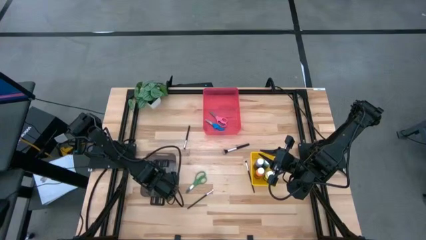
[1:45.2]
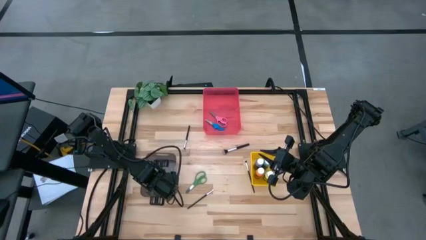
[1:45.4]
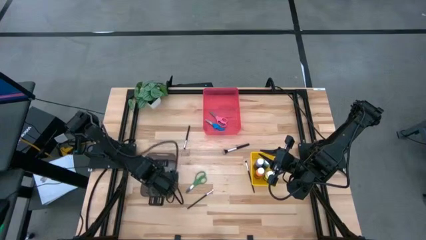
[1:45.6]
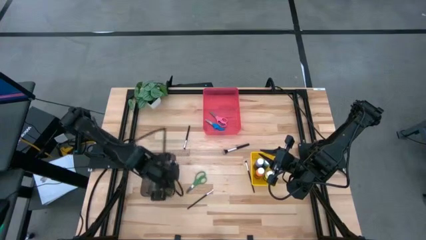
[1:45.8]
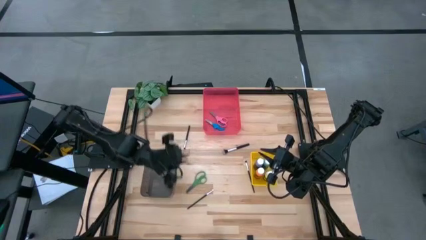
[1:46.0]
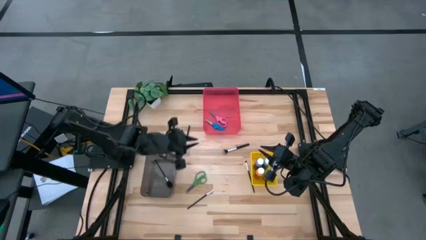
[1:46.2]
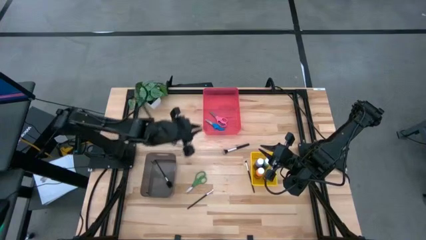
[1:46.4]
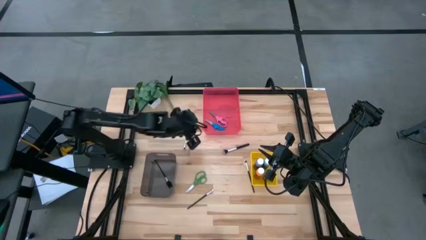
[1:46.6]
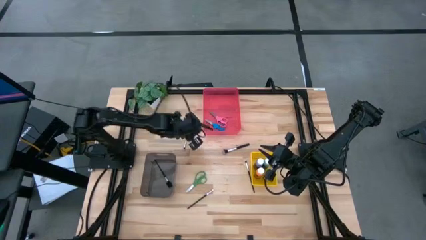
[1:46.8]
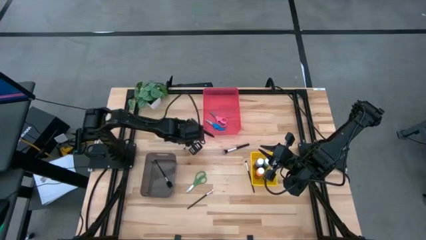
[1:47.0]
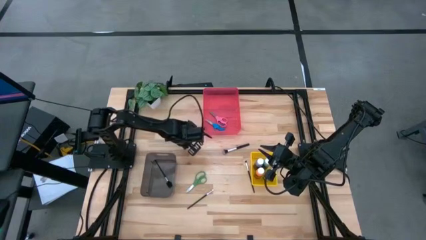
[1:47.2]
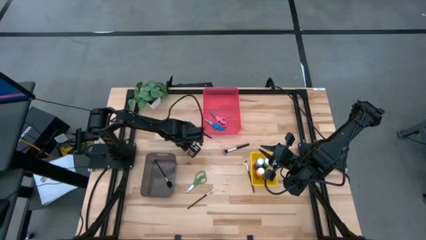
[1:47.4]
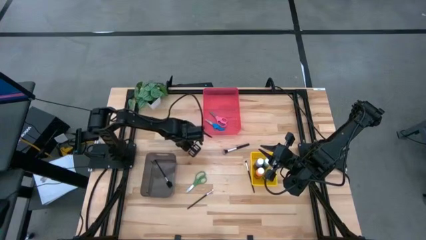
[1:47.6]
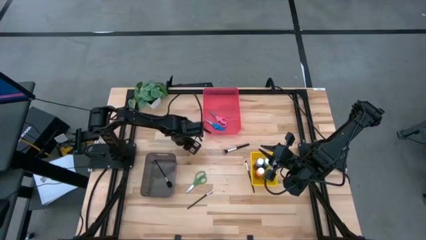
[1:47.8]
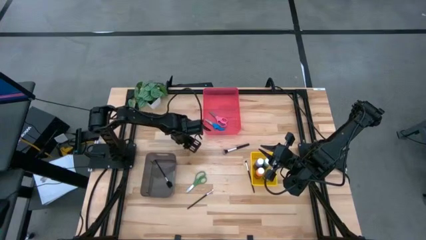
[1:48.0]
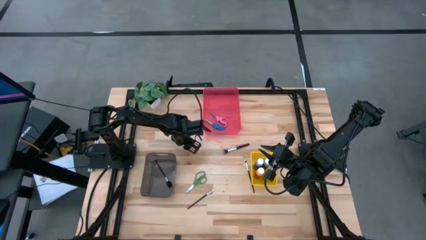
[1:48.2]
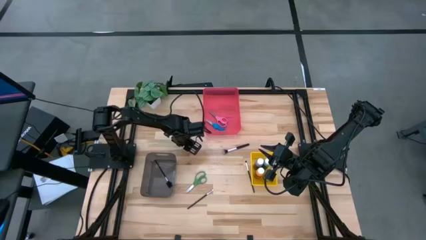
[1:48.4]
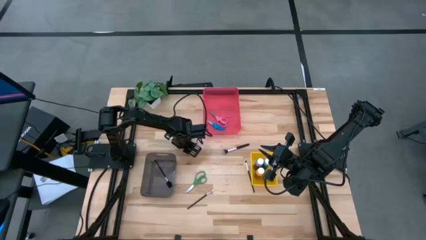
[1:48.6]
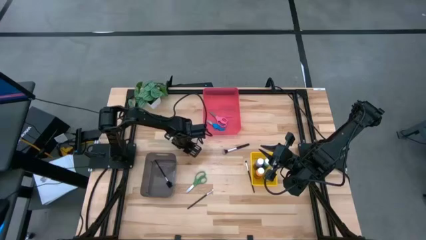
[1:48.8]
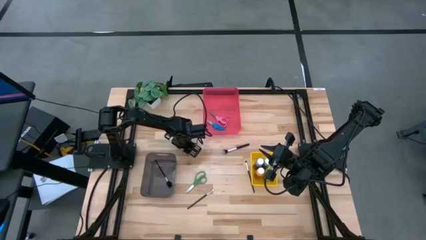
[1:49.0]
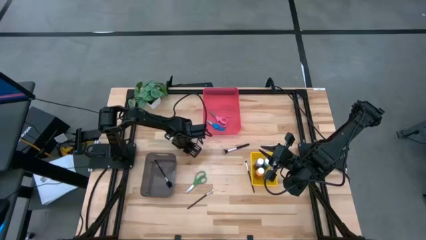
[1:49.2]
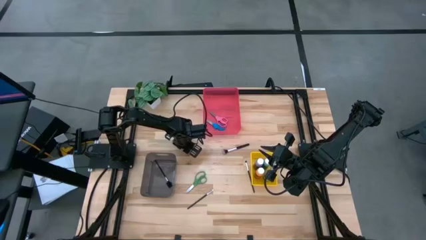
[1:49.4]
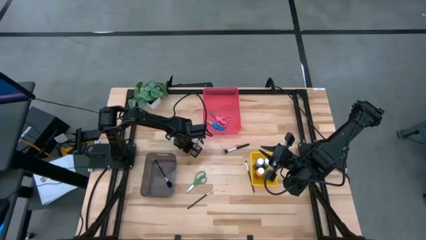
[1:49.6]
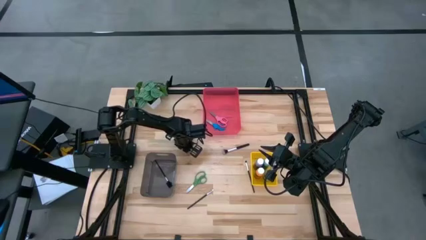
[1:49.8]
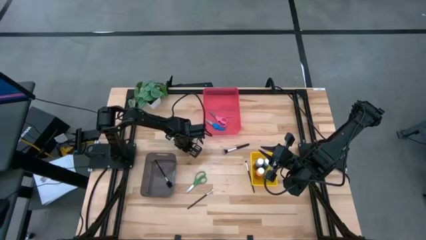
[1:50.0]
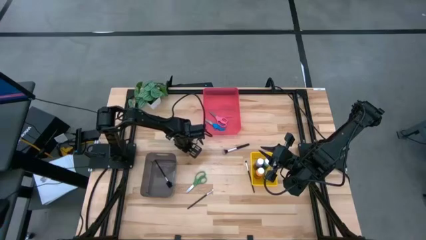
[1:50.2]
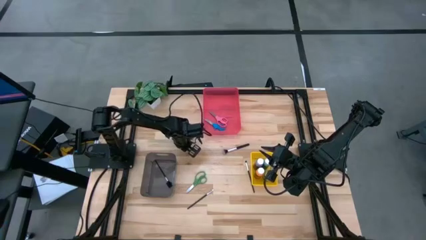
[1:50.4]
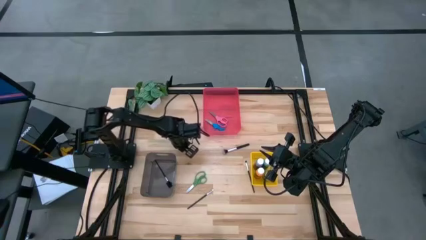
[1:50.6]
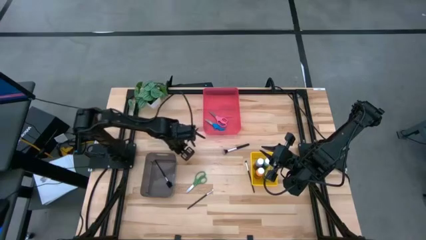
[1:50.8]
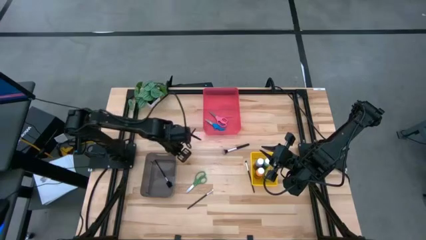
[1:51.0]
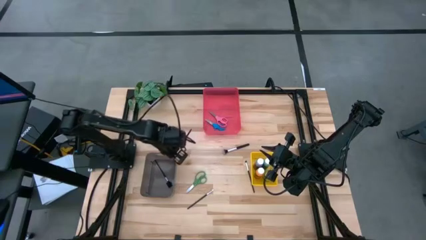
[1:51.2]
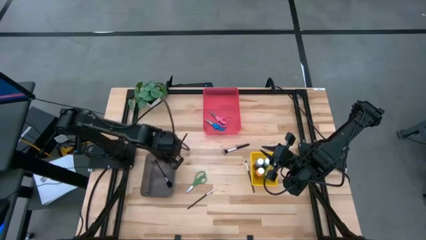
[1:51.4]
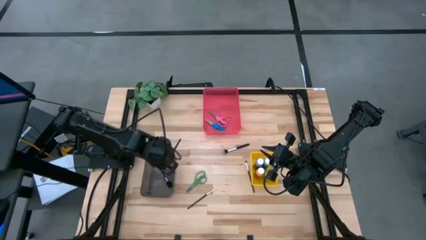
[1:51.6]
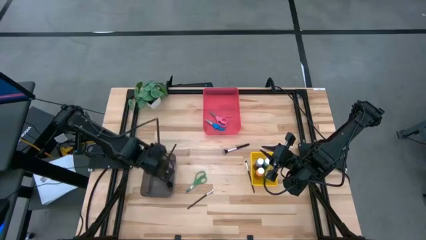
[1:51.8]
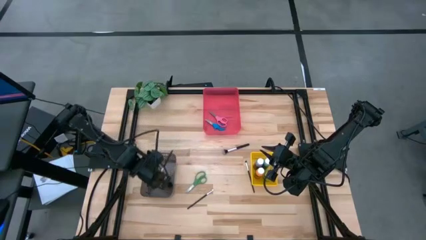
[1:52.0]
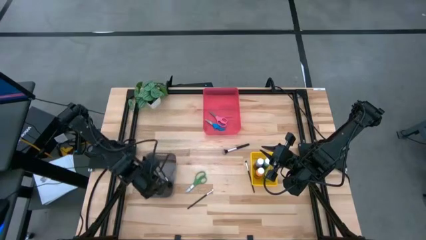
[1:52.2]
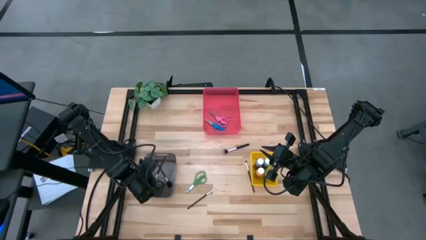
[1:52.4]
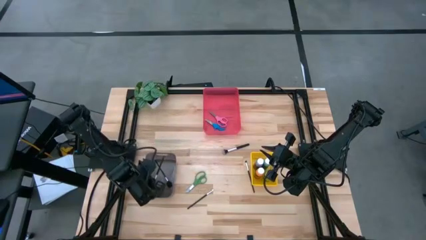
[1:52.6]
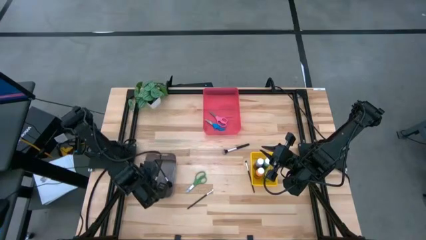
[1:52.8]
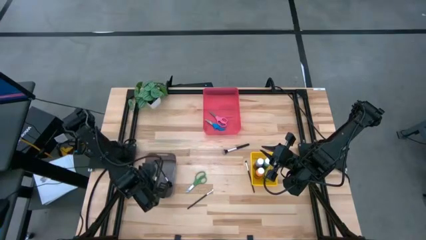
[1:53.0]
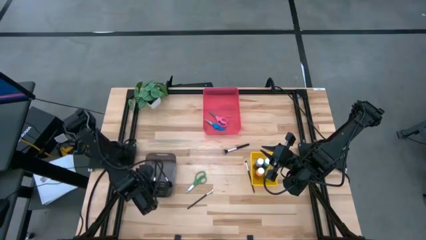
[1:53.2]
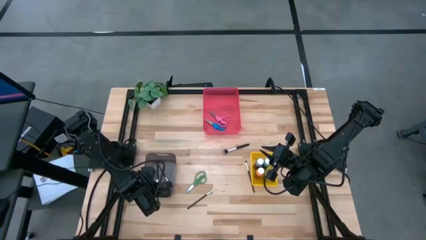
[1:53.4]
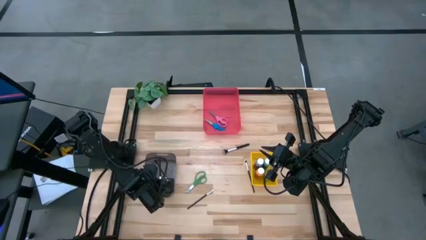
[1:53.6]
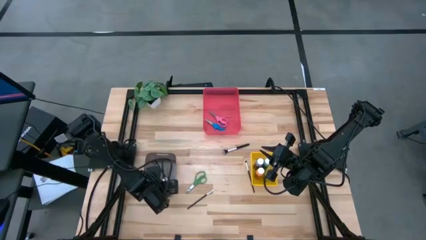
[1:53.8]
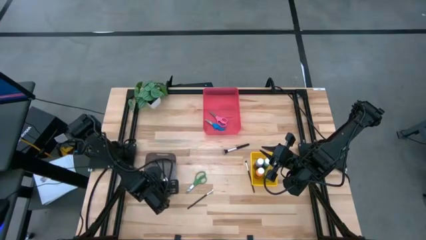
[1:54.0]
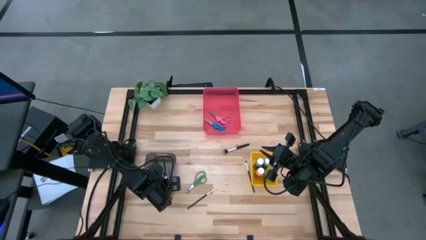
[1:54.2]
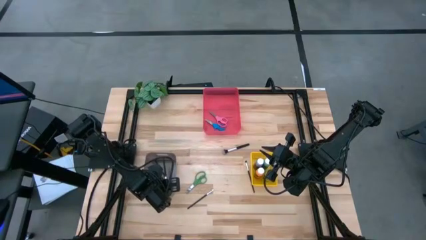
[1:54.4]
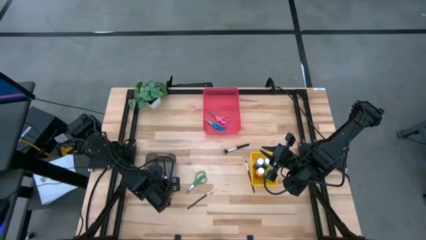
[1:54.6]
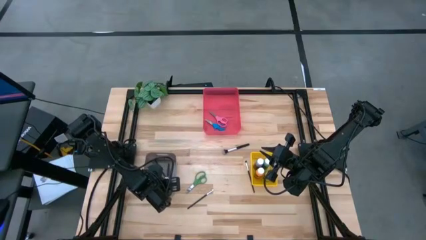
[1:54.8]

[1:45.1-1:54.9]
Task: Pick & Place Paint Supplies
Put the black makeup brush into the black bin

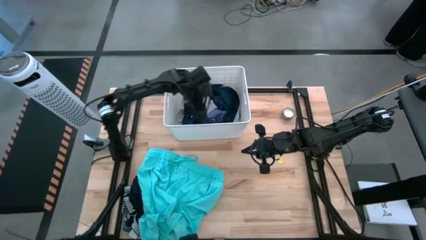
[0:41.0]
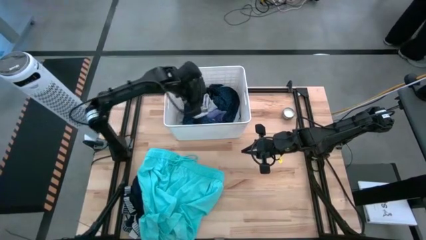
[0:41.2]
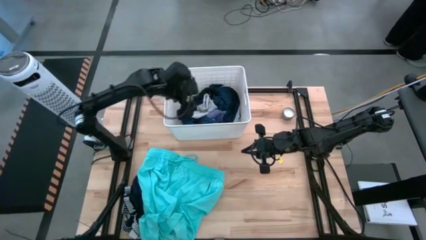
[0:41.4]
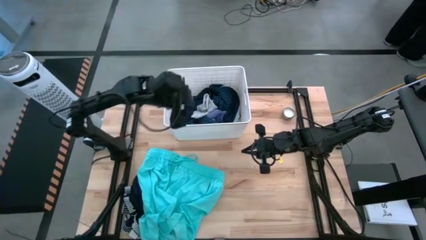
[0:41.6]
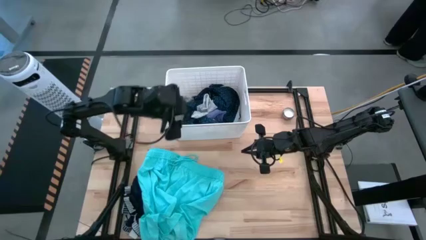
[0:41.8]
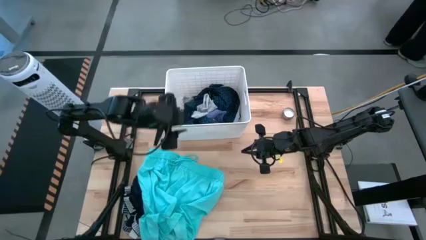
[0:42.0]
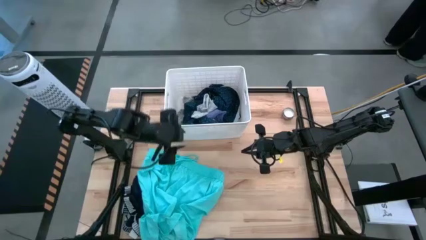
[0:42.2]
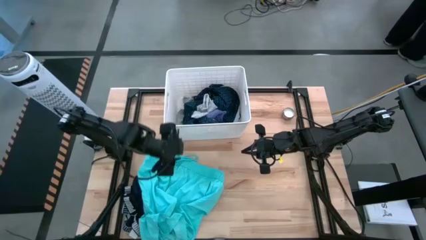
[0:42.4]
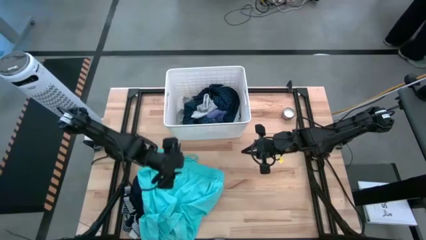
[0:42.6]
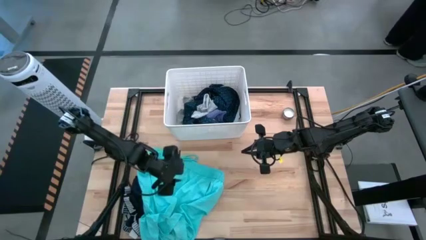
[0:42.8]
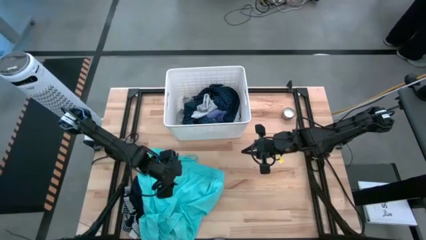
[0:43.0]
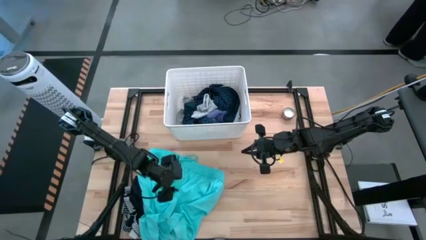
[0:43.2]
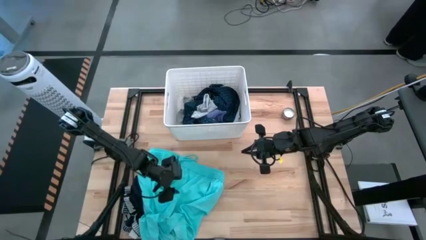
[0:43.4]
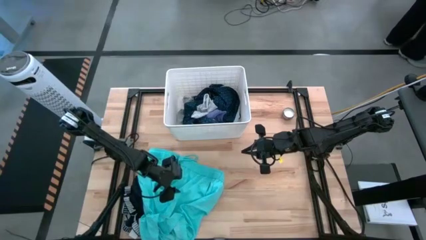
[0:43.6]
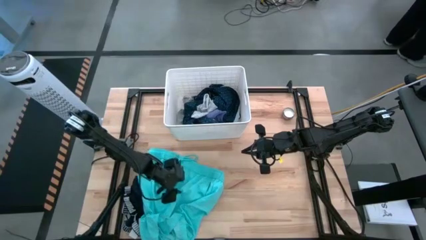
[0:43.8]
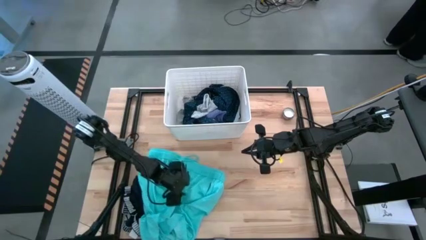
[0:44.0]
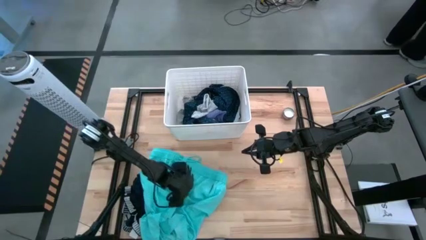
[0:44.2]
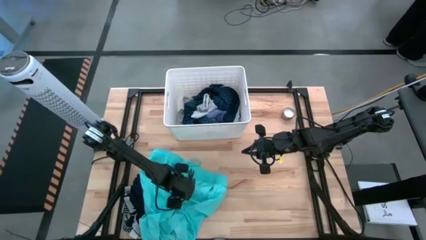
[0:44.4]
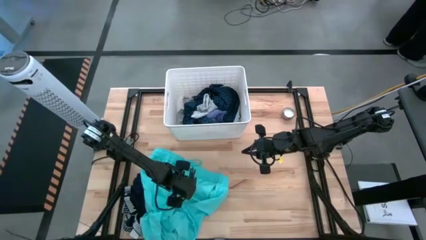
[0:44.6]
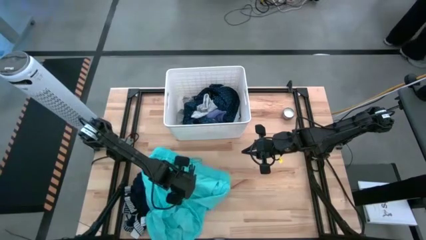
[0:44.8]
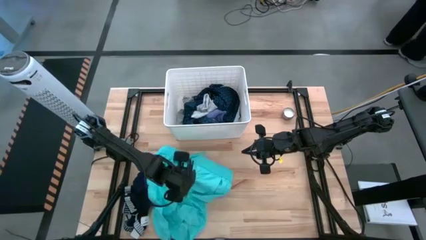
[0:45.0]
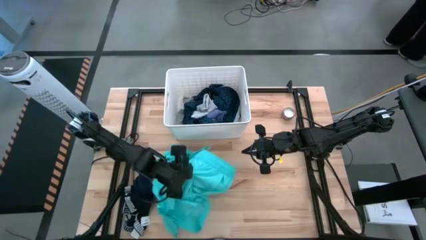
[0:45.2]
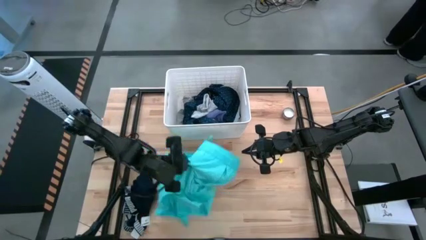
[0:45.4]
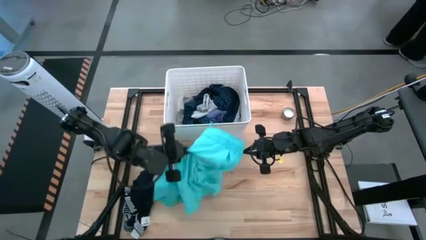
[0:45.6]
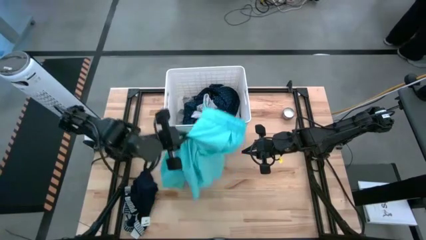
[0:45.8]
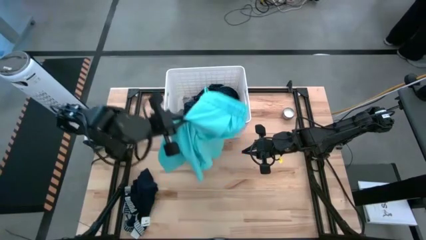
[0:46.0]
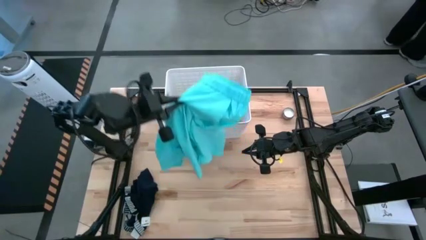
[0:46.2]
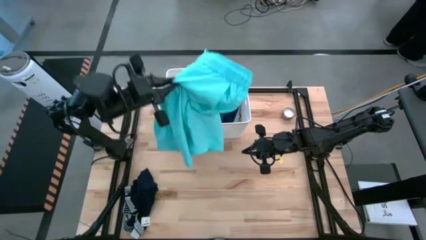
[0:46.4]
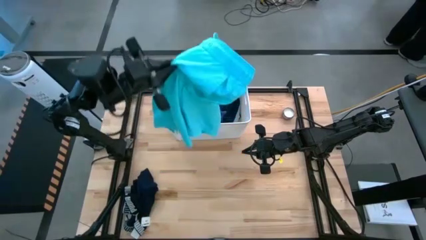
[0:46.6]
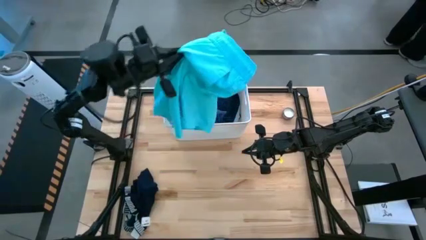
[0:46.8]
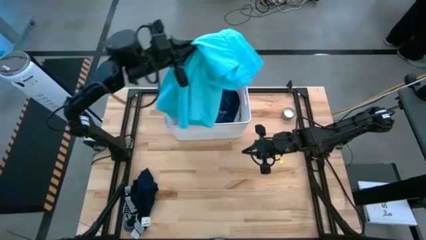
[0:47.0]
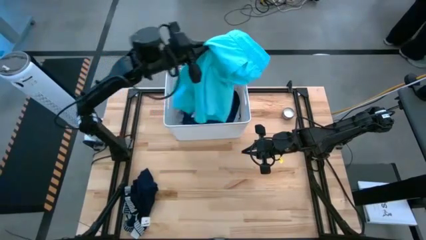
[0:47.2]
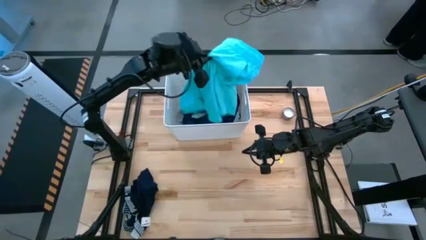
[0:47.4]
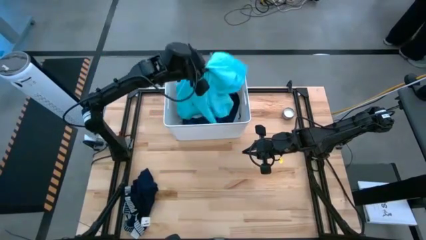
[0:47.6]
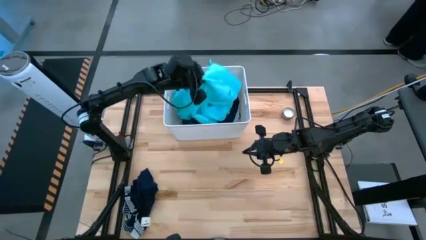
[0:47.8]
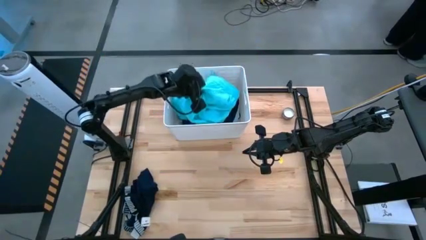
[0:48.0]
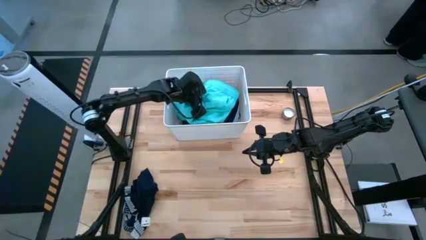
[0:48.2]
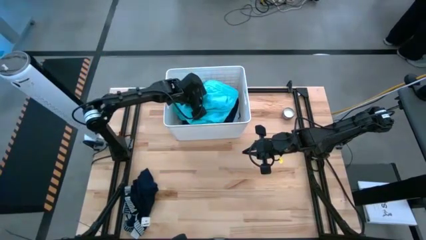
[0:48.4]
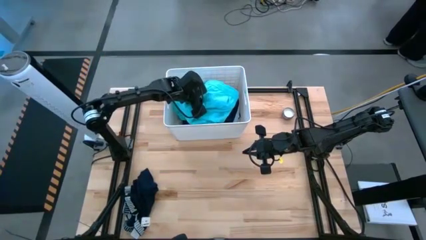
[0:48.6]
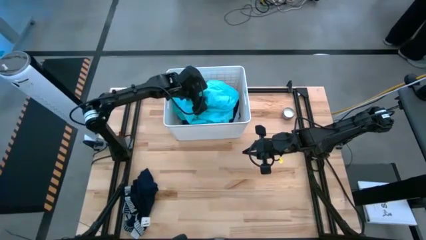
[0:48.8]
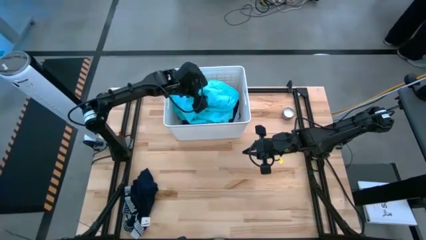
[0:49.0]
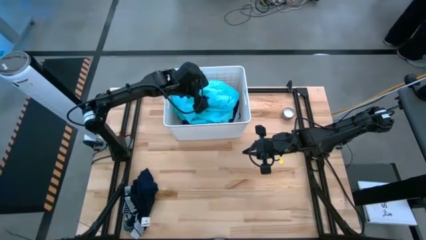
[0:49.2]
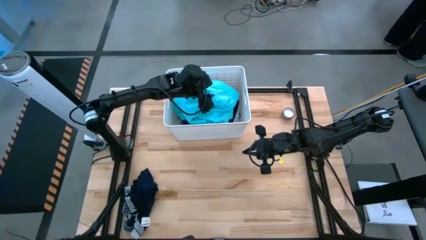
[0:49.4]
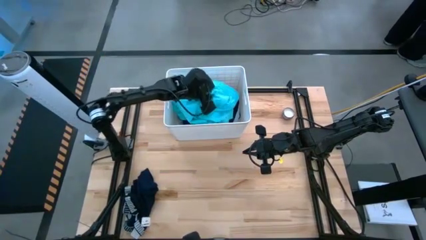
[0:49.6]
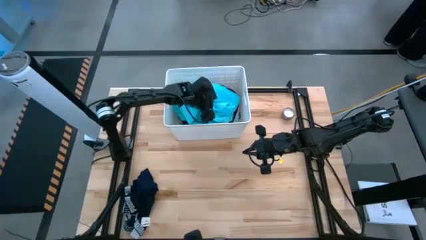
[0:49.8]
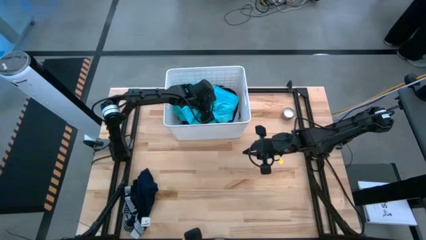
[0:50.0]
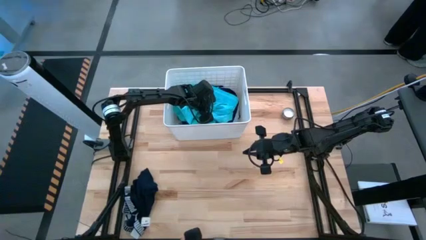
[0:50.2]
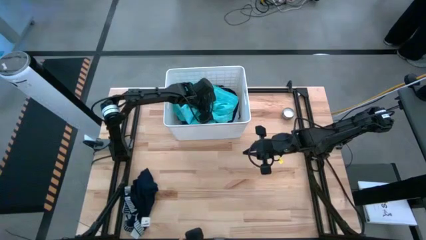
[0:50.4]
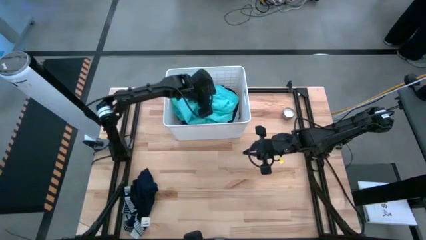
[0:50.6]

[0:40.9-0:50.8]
Task: Sort clothes
Put the light blue shorts into the white bin
